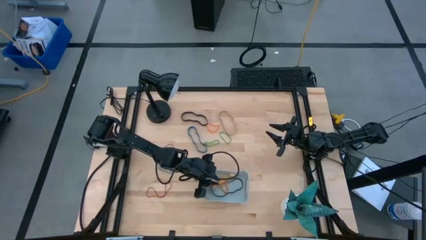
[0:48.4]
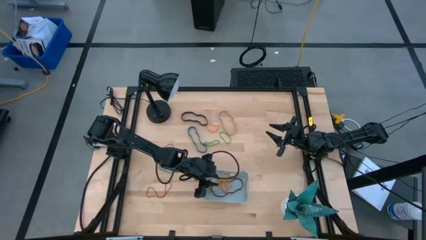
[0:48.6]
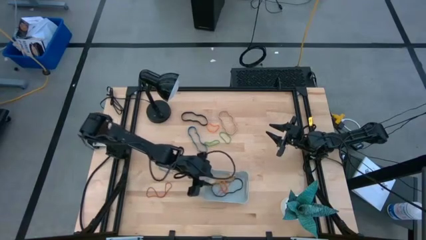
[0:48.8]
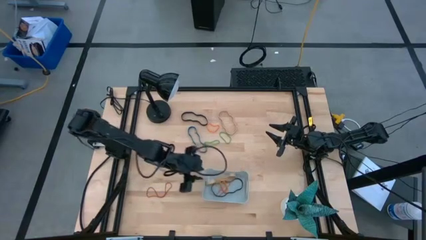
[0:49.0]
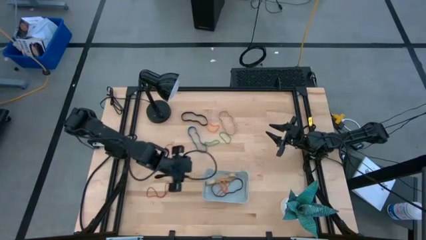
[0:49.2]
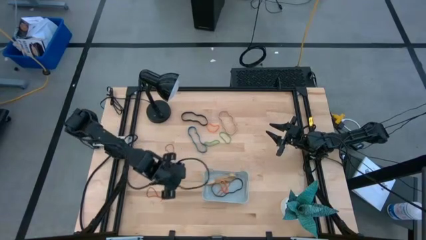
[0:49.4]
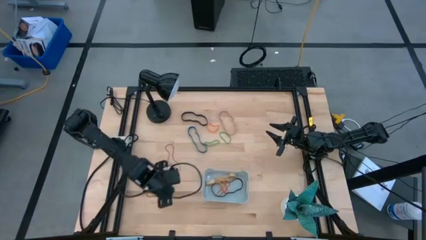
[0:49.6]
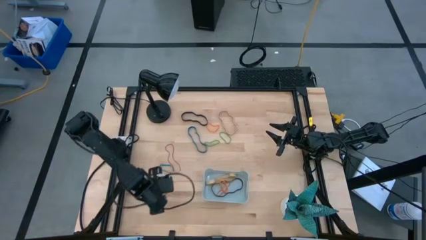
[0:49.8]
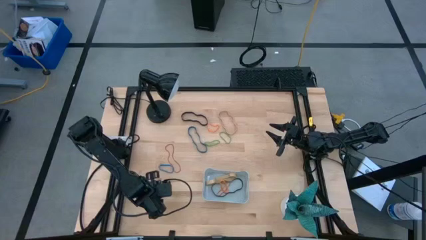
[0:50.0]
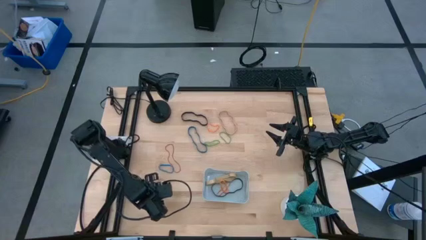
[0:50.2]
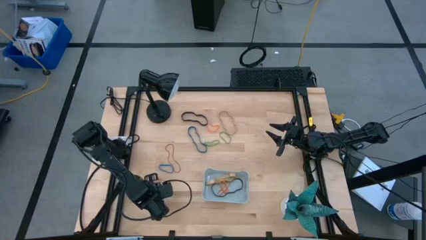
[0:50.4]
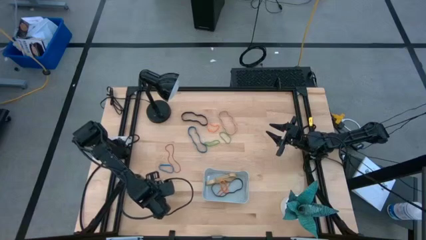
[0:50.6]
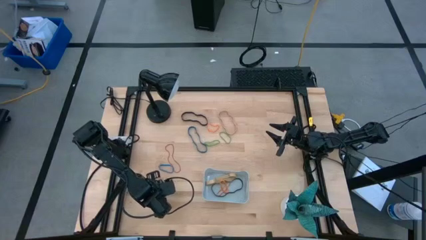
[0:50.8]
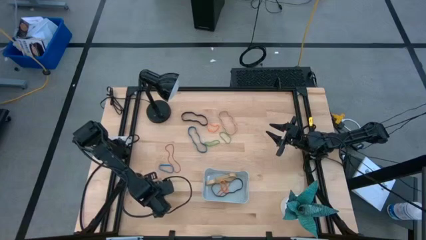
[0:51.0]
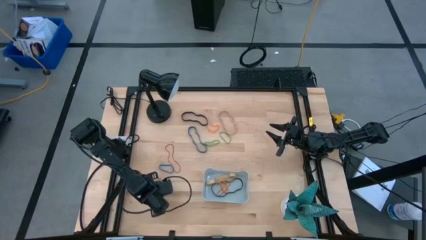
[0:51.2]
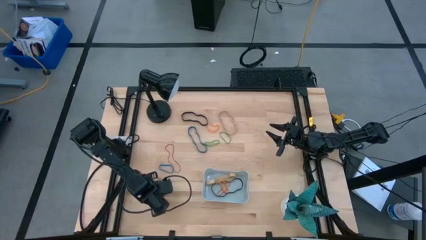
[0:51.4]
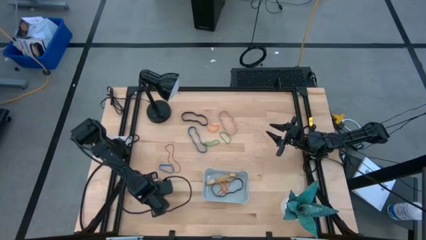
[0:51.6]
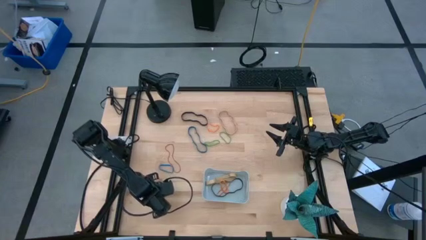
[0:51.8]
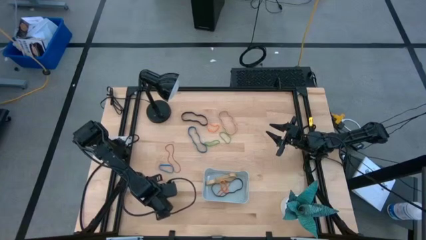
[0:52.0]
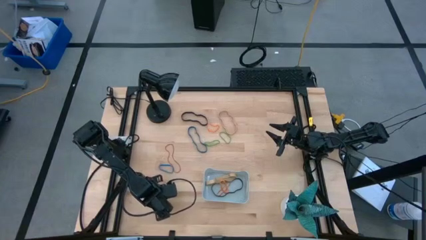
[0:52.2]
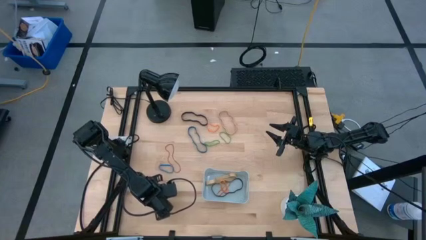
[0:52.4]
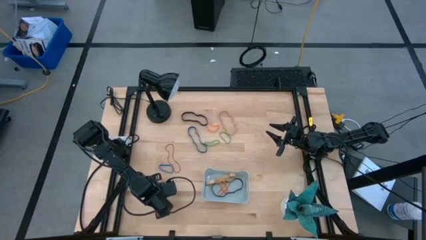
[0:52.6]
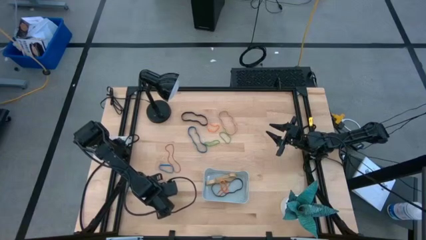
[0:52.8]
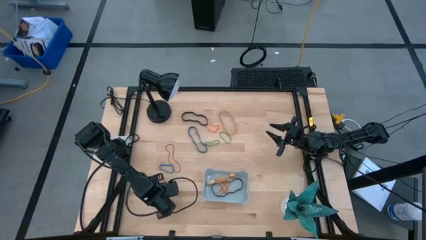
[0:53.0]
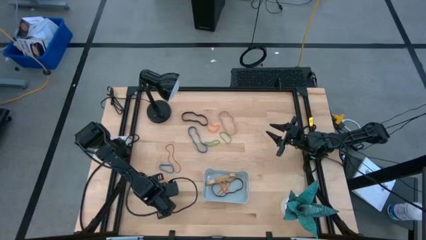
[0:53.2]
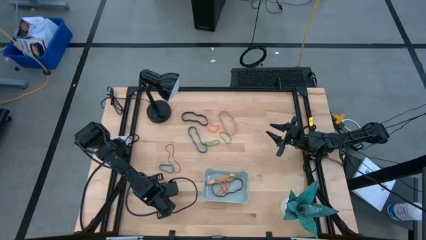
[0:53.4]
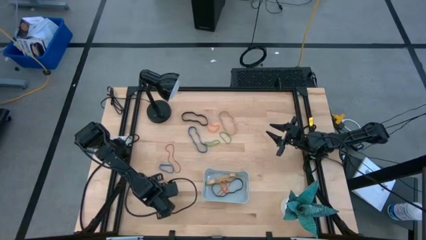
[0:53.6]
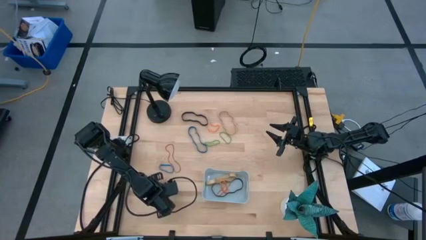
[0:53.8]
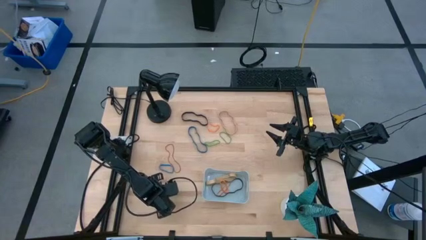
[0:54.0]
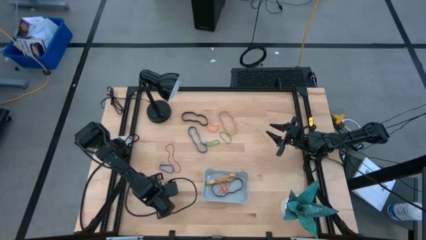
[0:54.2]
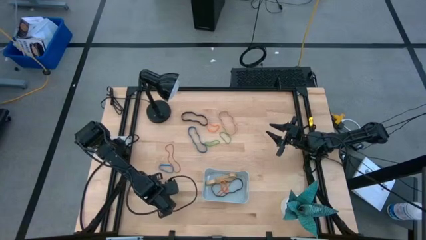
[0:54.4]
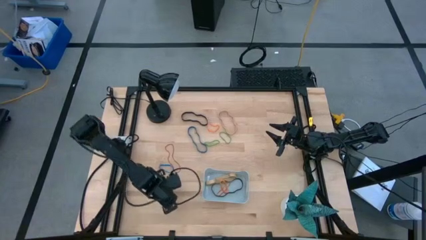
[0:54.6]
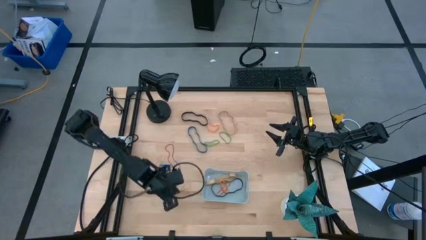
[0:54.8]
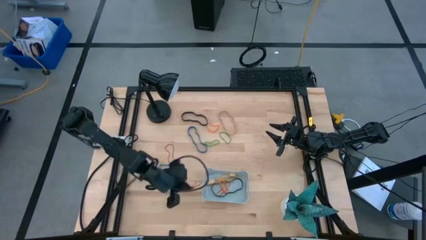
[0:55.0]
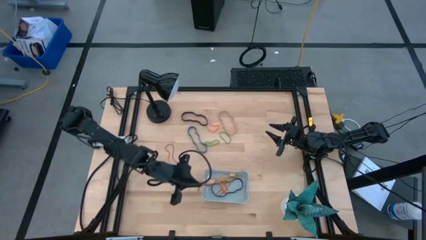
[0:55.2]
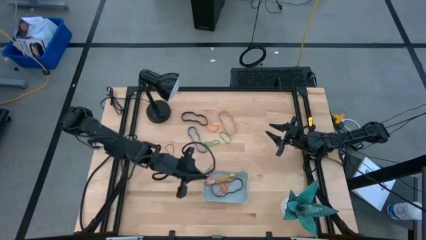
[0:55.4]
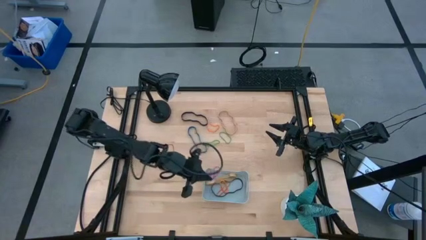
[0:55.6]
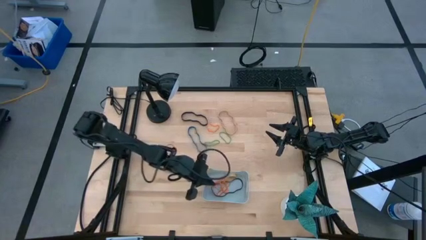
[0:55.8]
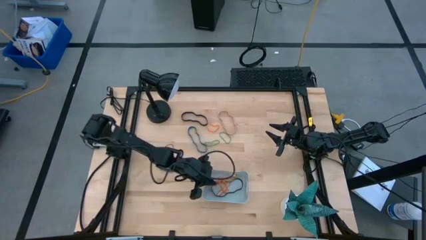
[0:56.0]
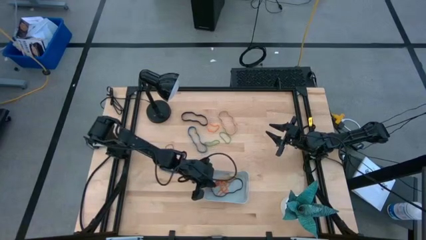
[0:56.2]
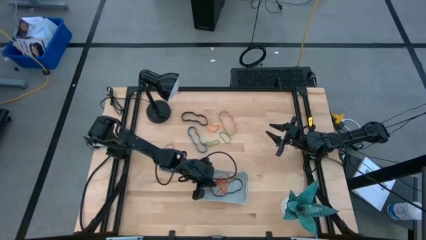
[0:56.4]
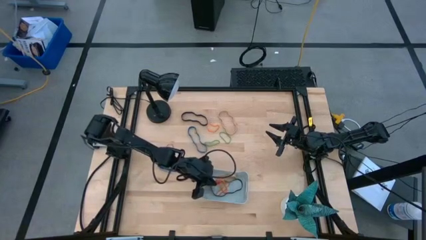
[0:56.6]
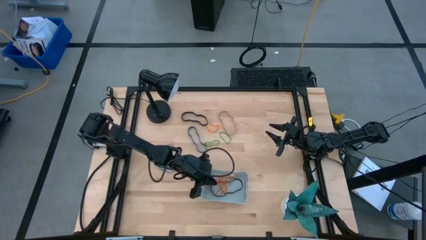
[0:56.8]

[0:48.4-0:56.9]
Task: Pick and place rubber bands into bin
Put the bottom red rubber band into the gray bin

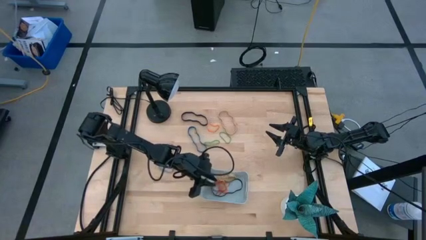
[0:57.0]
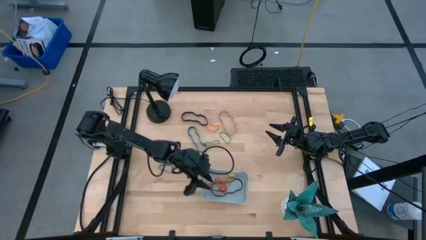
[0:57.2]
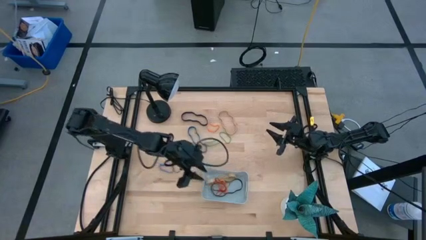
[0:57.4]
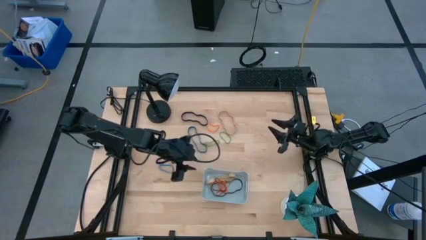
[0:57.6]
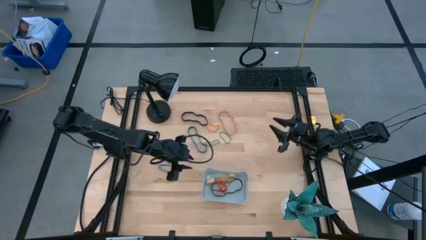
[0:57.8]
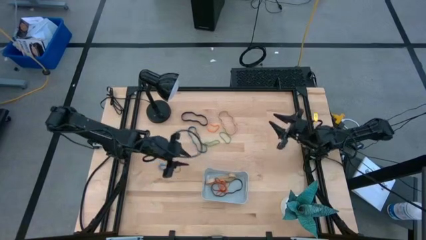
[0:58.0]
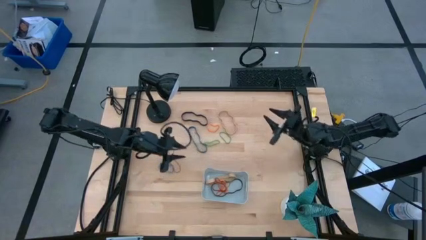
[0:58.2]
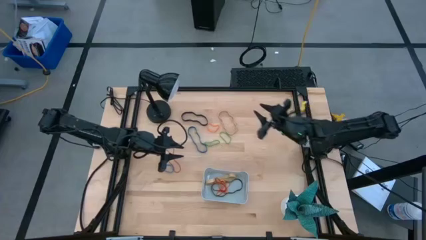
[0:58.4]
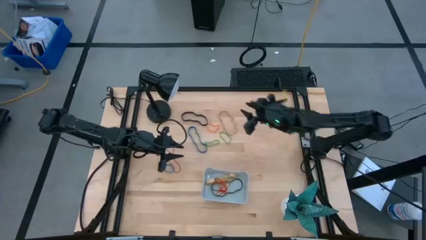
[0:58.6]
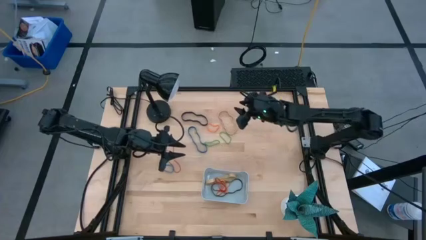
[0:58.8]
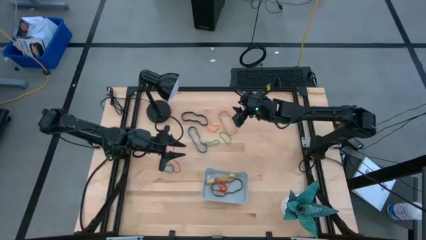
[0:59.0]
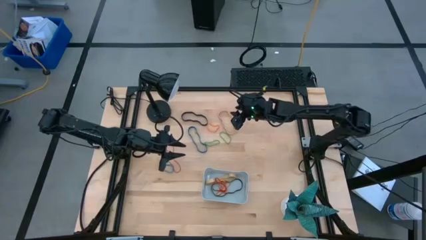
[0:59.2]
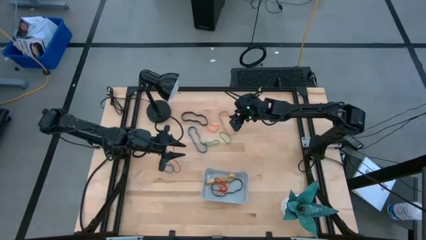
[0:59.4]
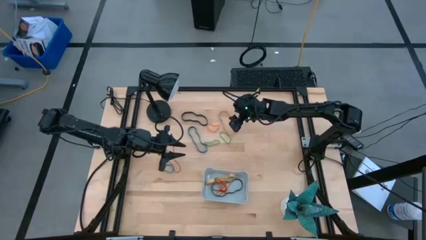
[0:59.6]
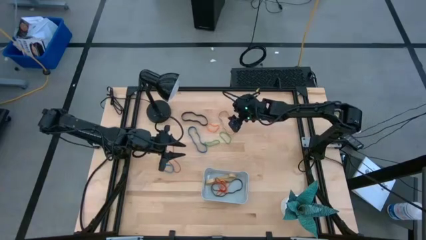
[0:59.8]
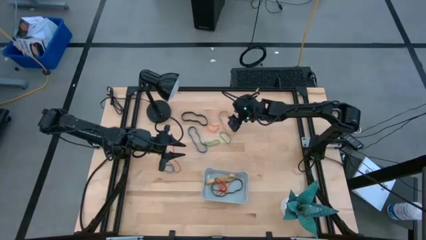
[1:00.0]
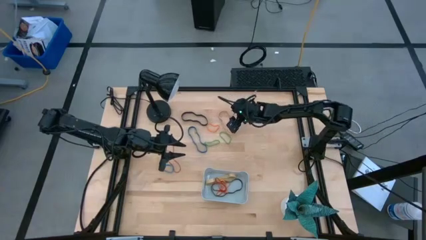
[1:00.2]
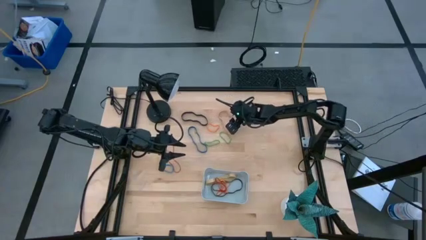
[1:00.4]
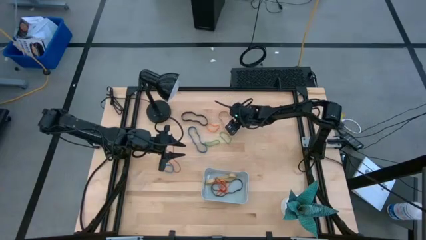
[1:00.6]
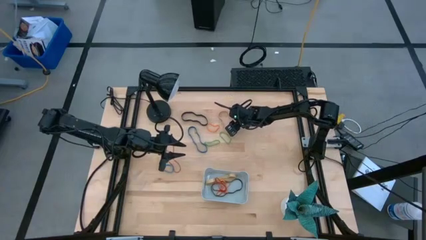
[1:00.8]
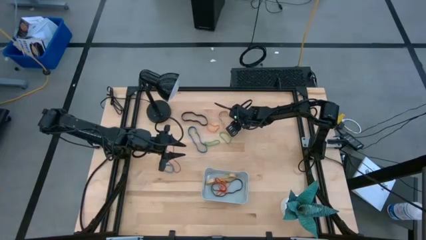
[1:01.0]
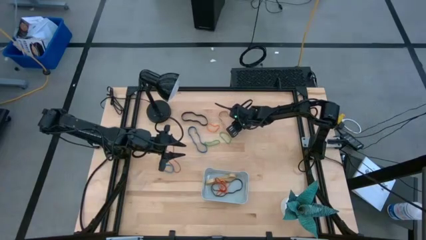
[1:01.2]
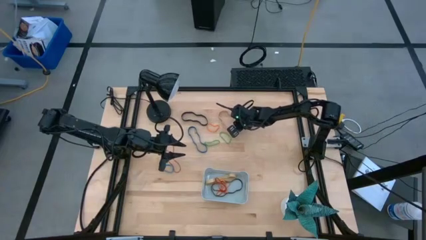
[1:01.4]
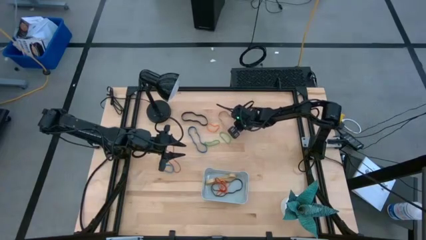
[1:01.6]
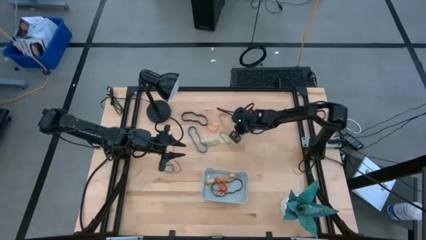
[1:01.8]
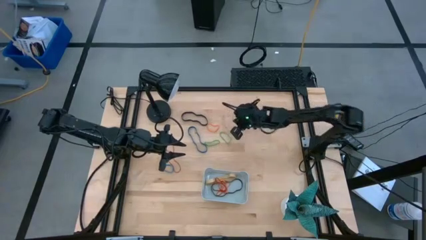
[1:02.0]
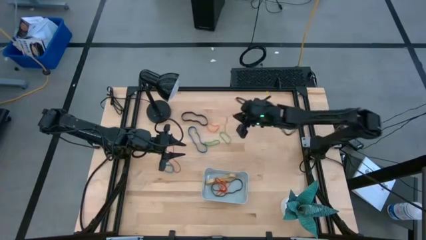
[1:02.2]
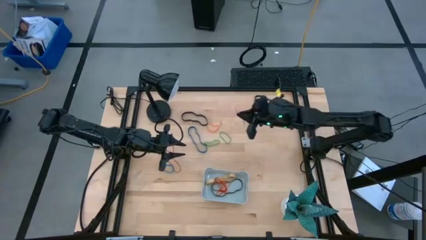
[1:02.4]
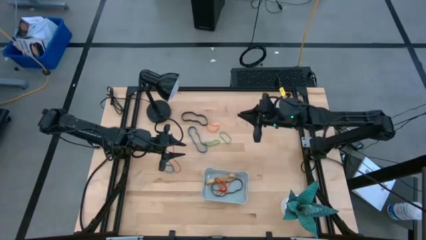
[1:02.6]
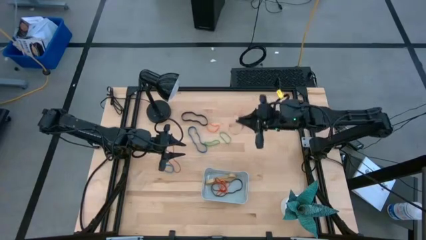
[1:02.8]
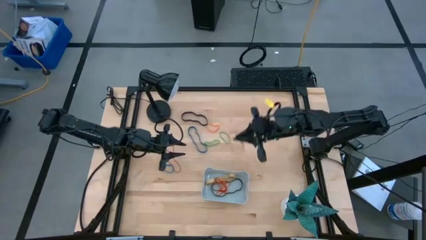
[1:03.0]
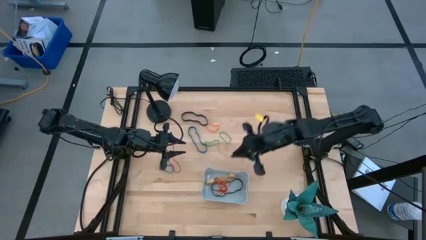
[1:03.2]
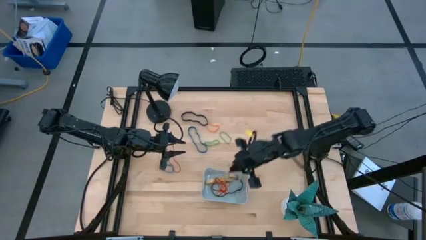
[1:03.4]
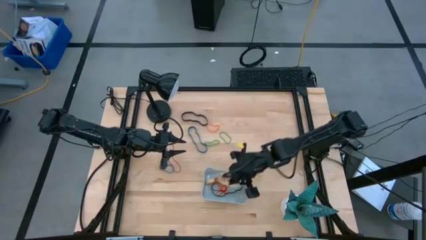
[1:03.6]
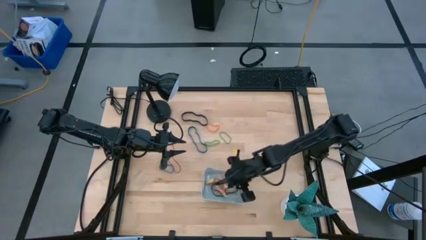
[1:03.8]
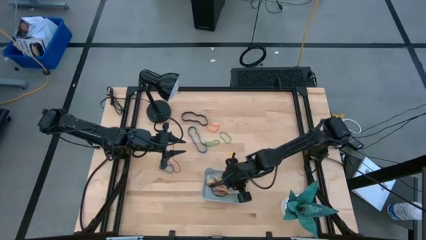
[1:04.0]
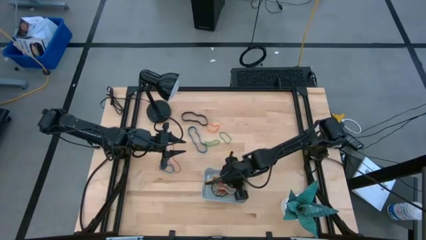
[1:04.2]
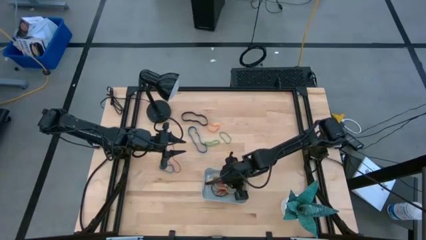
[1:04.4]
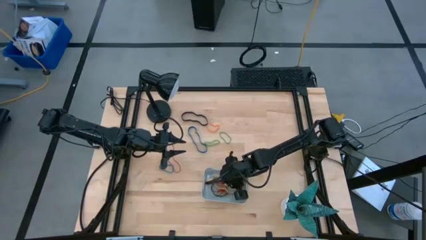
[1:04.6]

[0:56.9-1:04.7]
Put the brown rubber band into the gray bin

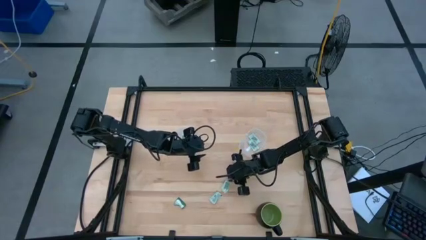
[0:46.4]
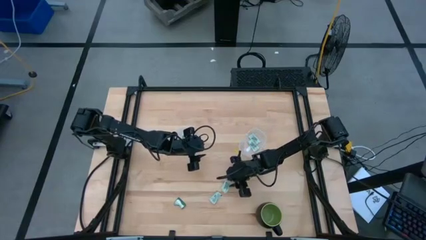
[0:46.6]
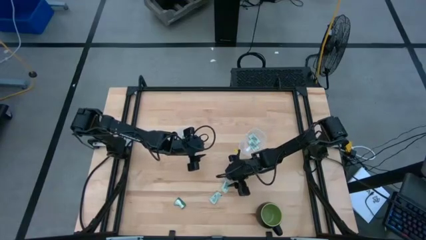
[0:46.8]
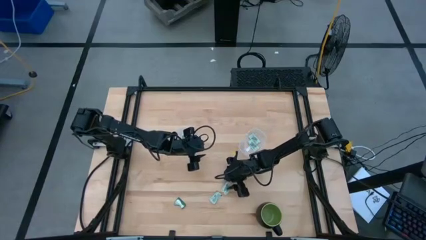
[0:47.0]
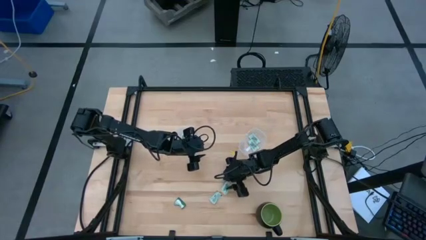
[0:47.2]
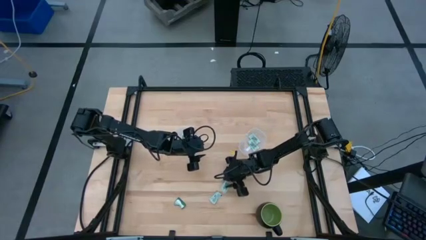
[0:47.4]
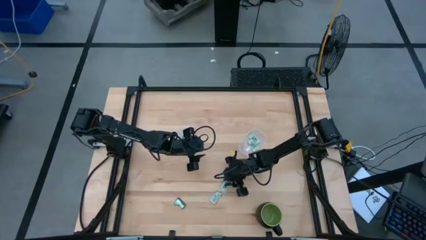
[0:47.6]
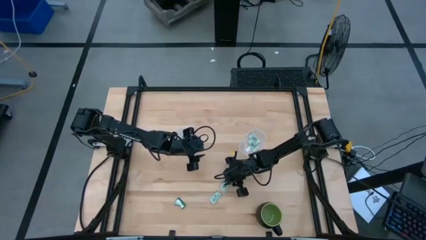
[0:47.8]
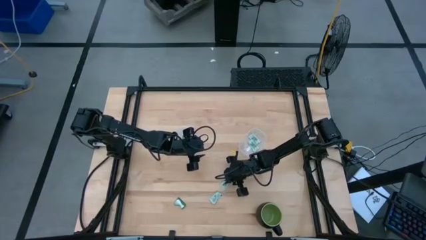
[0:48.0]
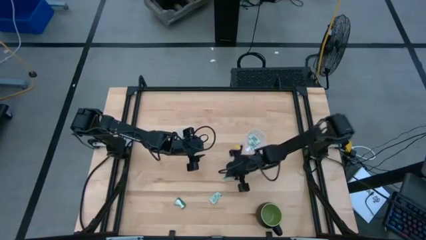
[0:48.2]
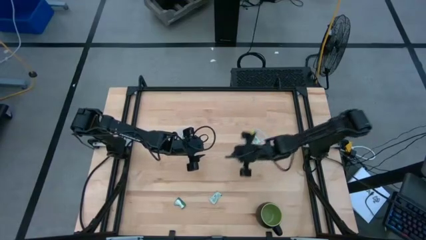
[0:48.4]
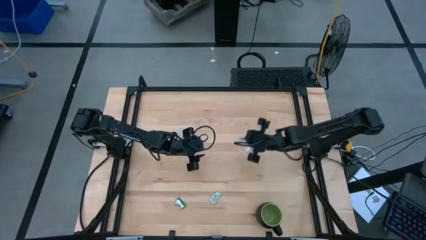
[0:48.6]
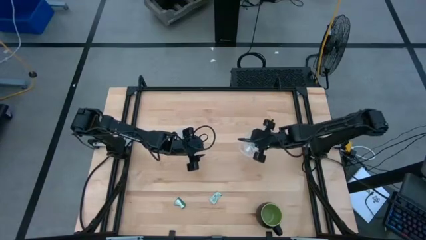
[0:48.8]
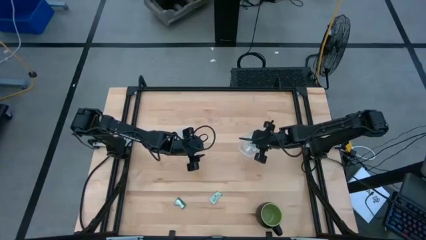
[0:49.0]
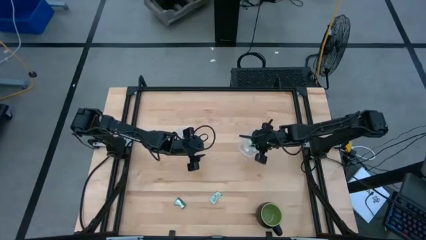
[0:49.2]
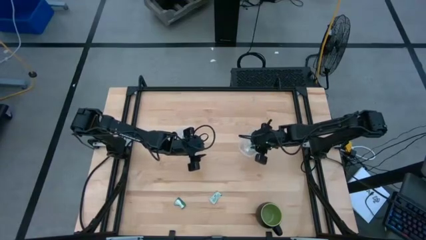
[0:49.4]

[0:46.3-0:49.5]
Task: Pick and place Stevia / Truvia into bins
Put the white stevia packet into the right transparent container
